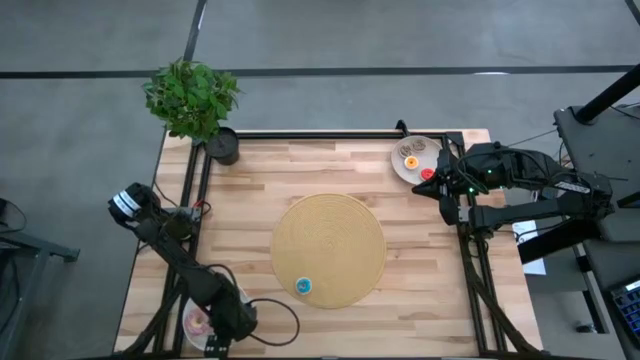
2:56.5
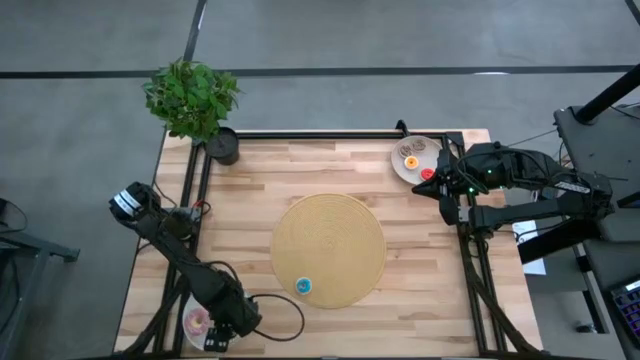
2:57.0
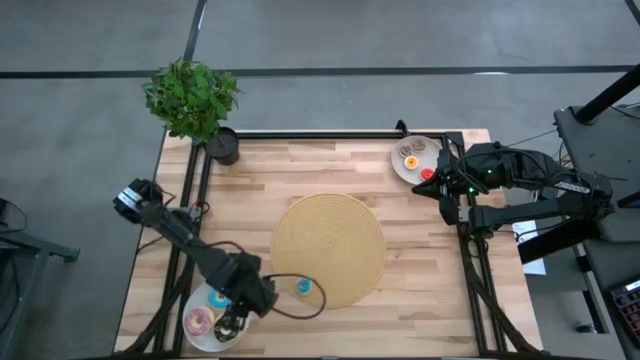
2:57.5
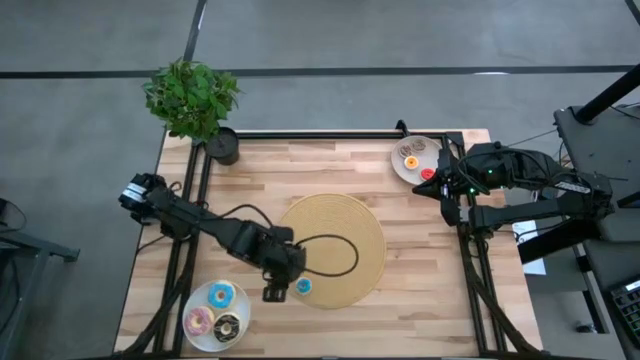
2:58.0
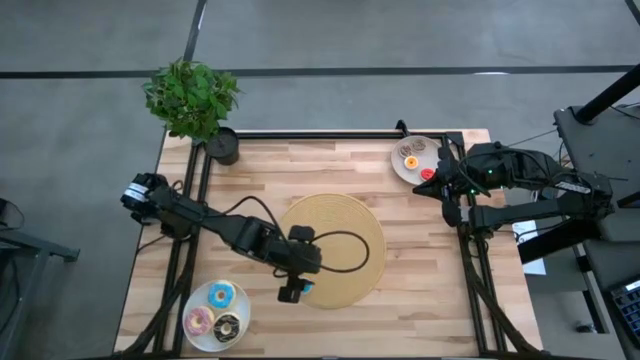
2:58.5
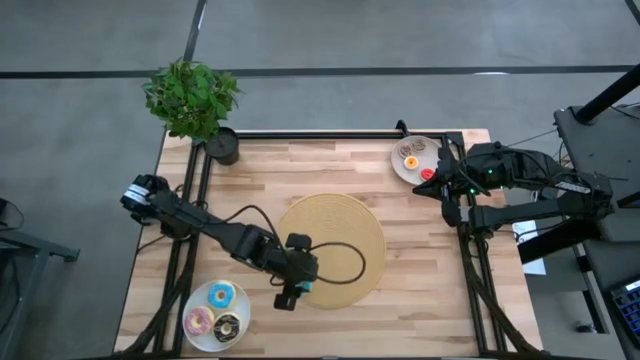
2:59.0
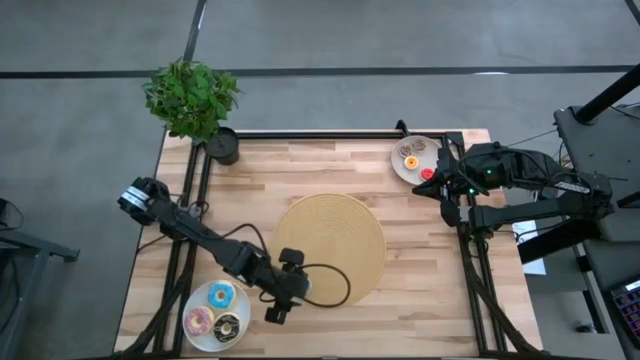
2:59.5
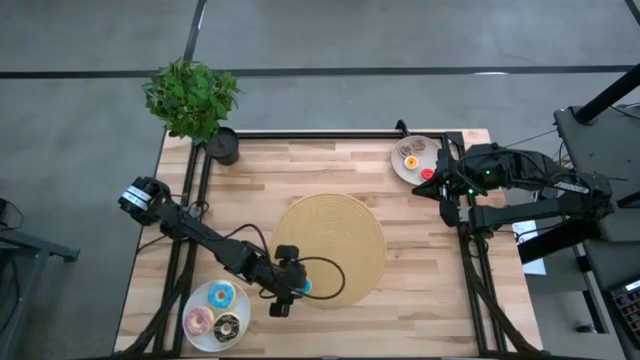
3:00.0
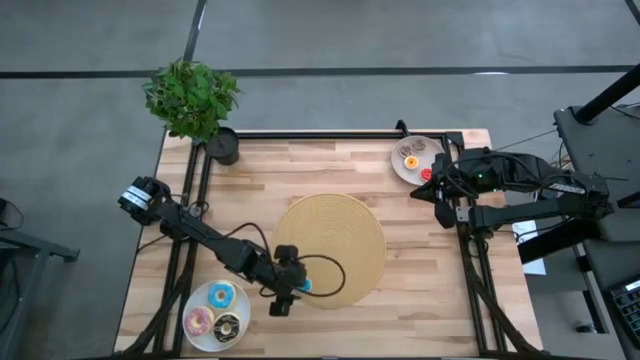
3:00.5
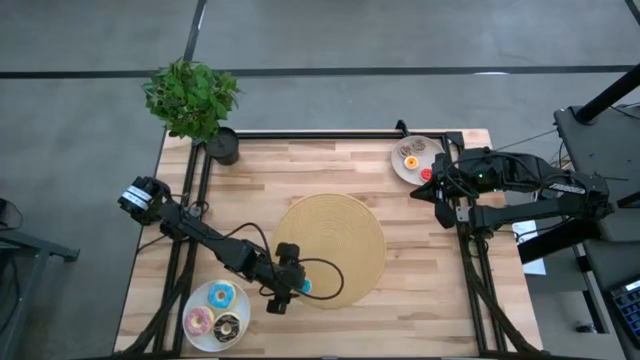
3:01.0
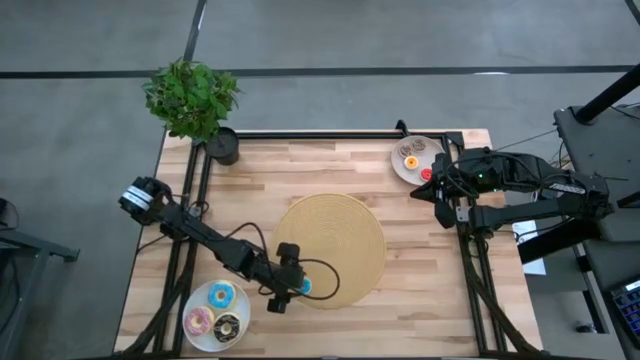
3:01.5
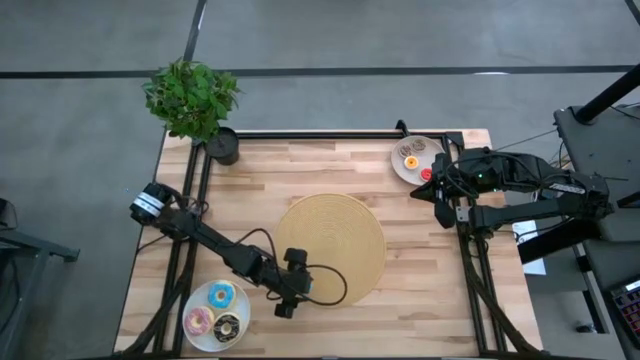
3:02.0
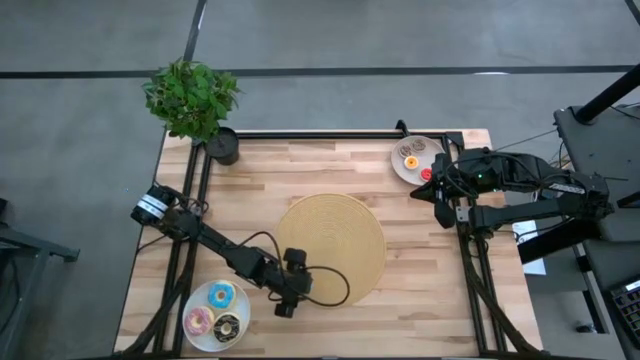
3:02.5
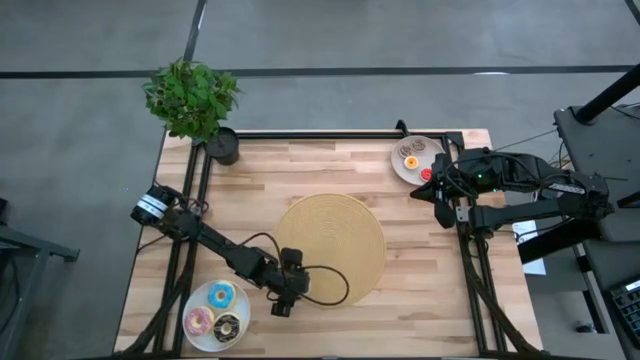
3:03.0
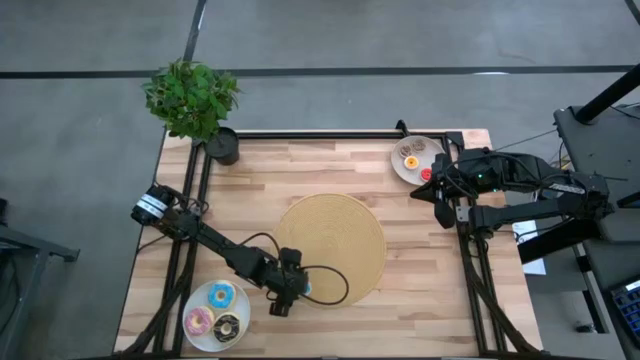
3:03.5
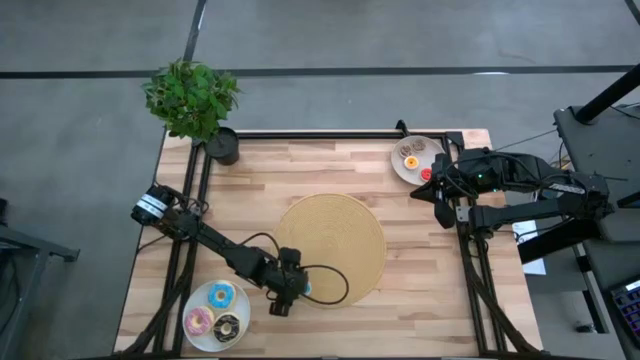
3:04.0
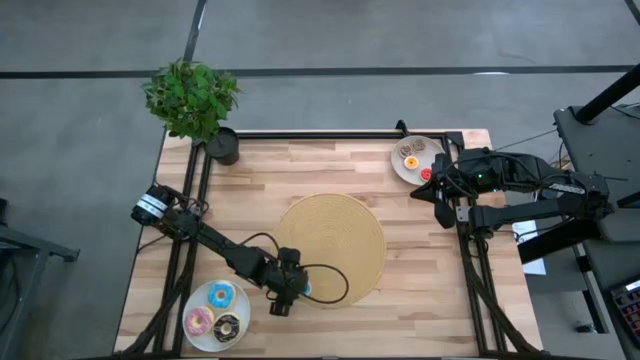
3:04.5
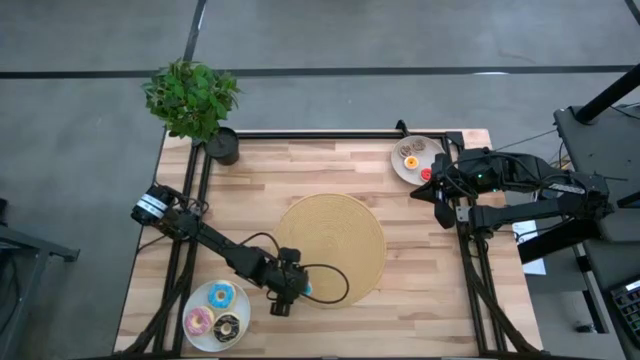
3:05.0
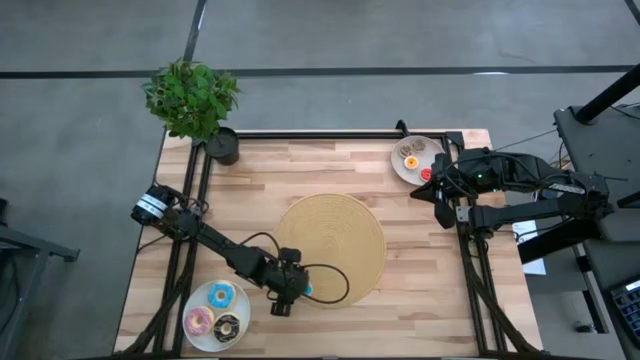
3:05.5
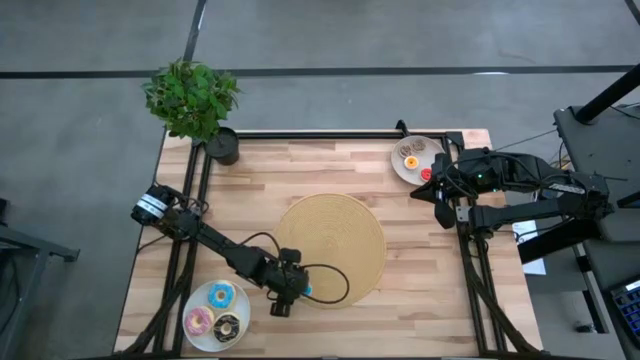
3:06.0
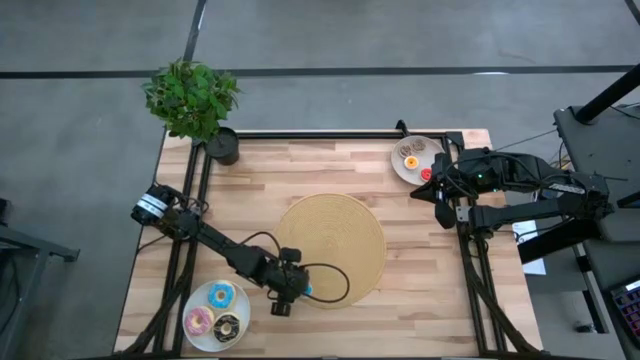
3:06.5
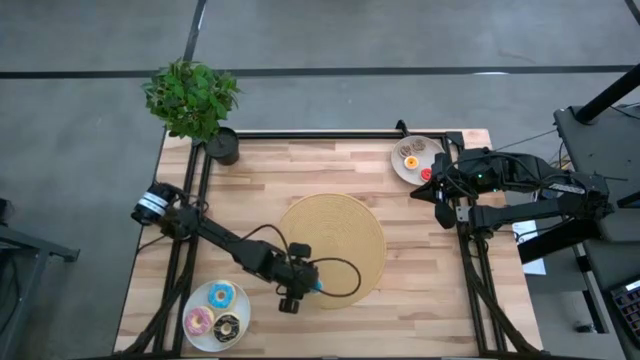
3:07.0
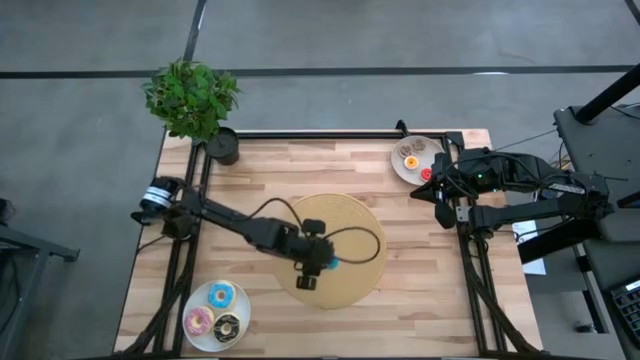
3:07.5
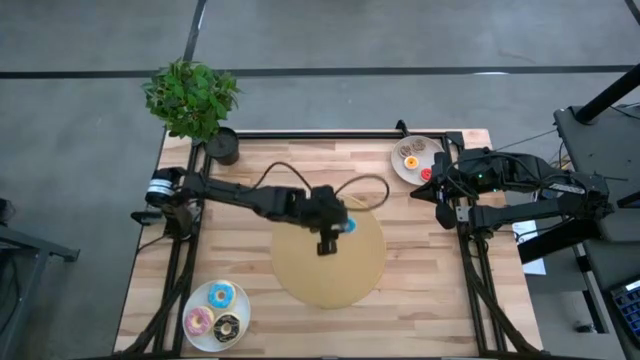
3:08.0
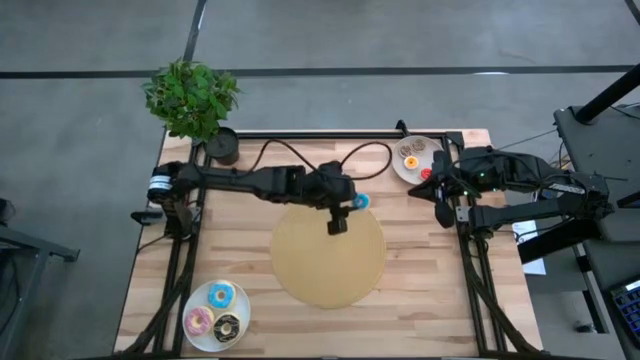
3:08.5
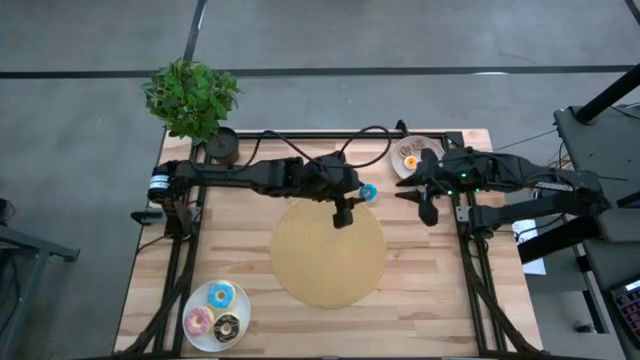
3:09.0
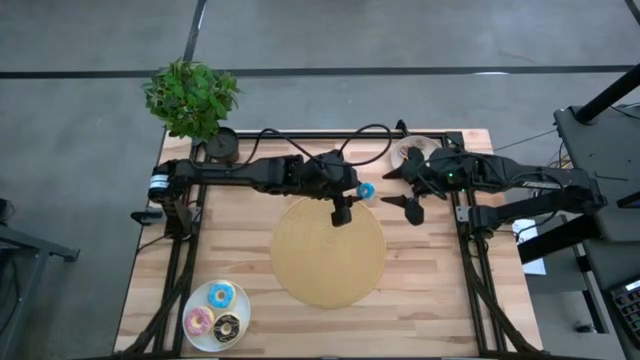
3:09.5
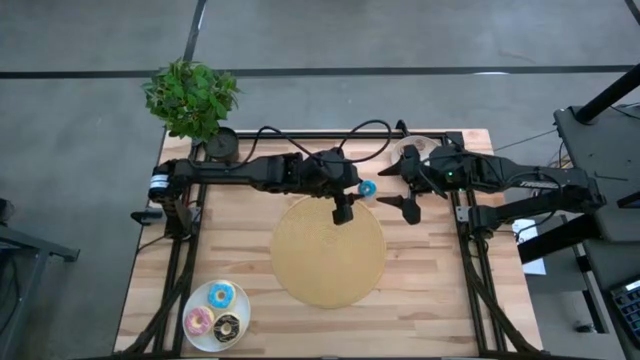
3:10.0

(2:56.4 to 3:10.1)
Task: Pick & Place donuts
Put the small blue donut on the gray plate

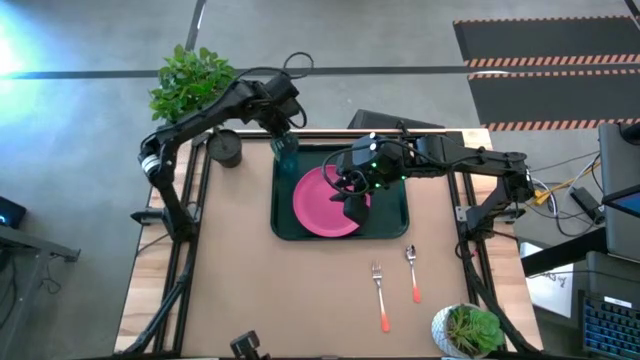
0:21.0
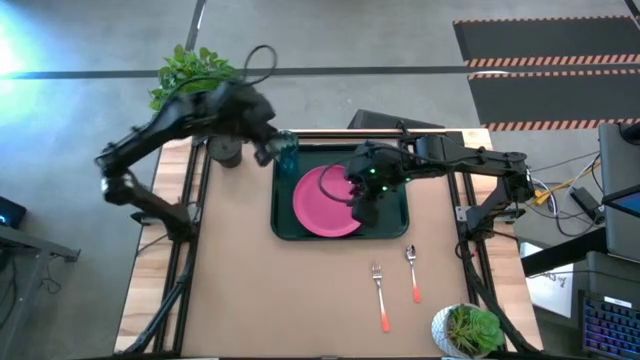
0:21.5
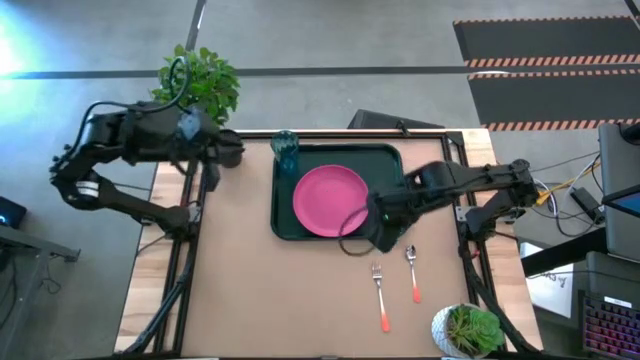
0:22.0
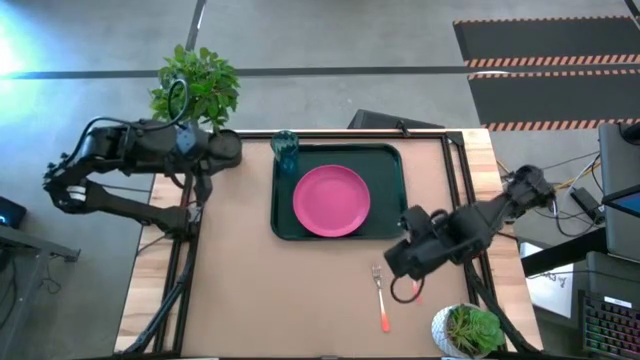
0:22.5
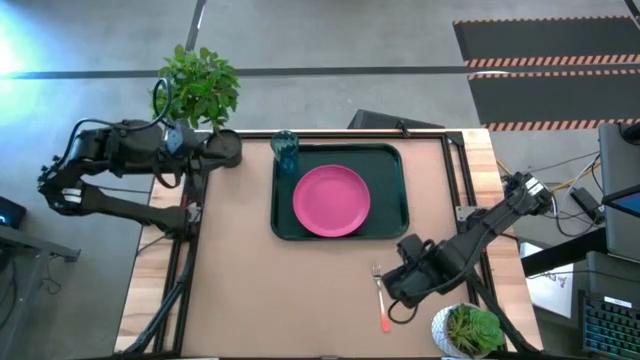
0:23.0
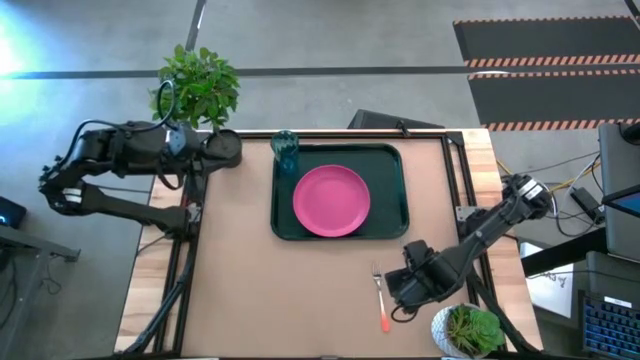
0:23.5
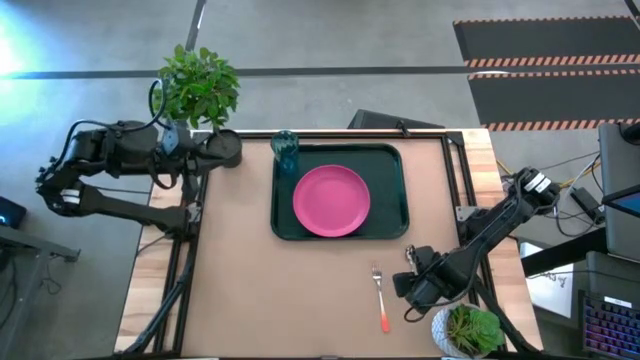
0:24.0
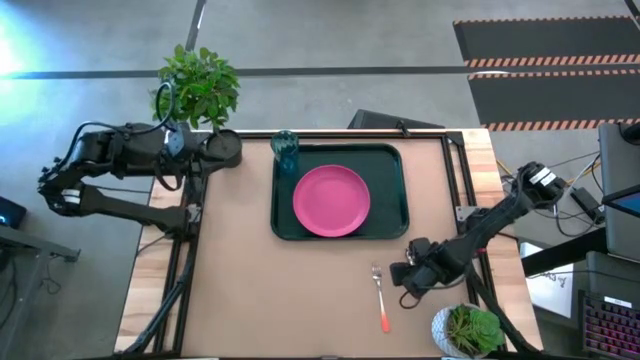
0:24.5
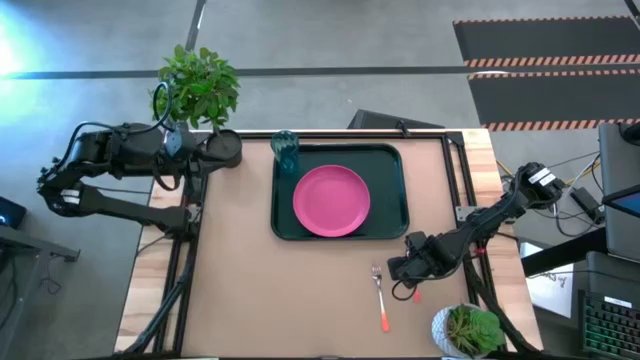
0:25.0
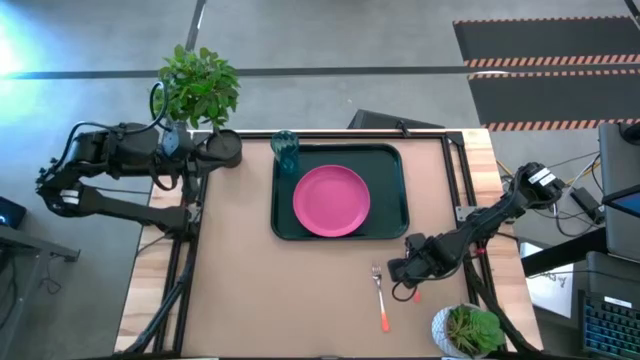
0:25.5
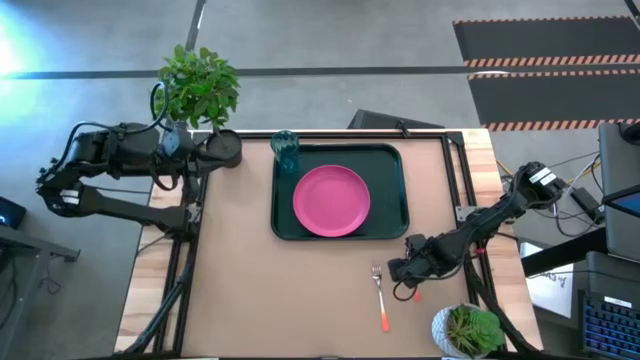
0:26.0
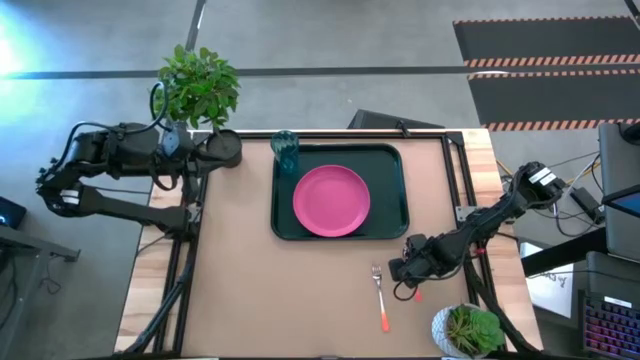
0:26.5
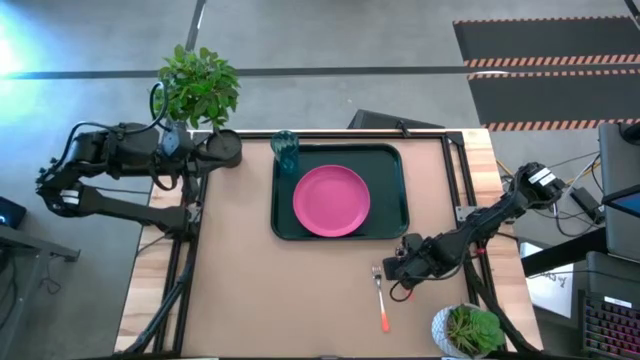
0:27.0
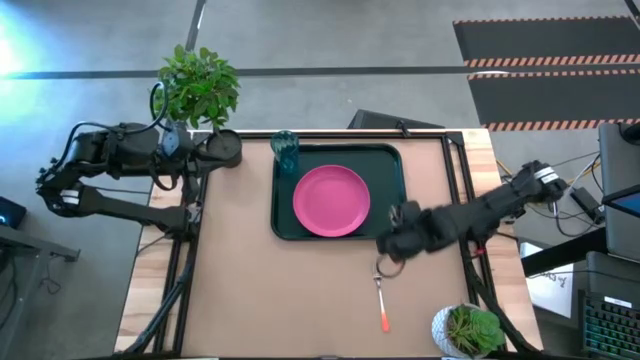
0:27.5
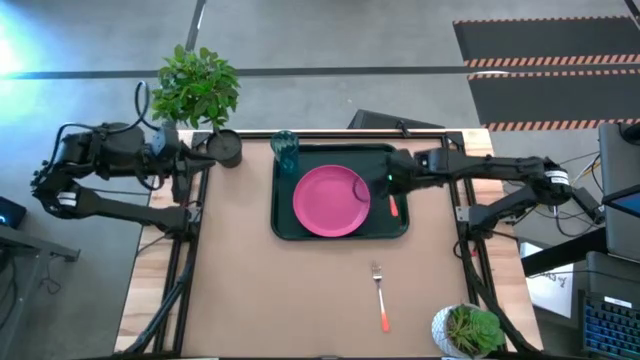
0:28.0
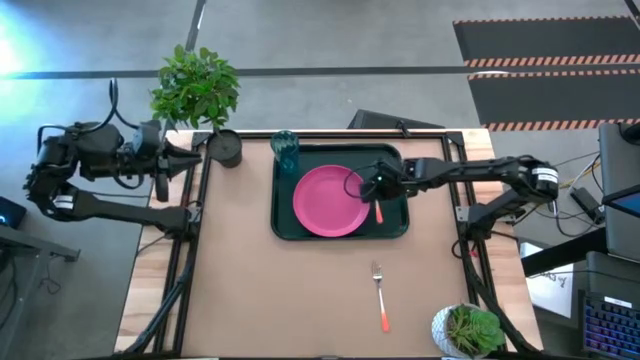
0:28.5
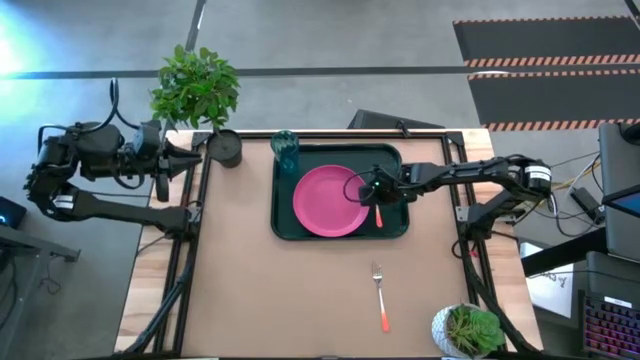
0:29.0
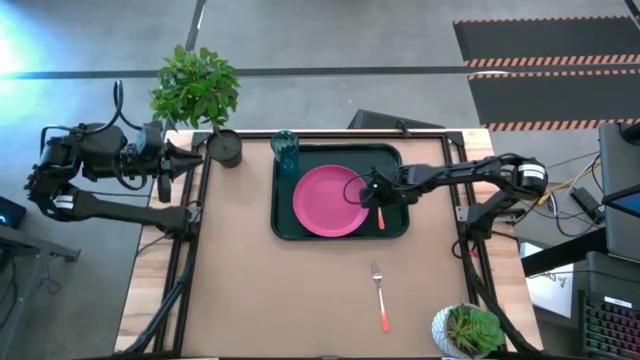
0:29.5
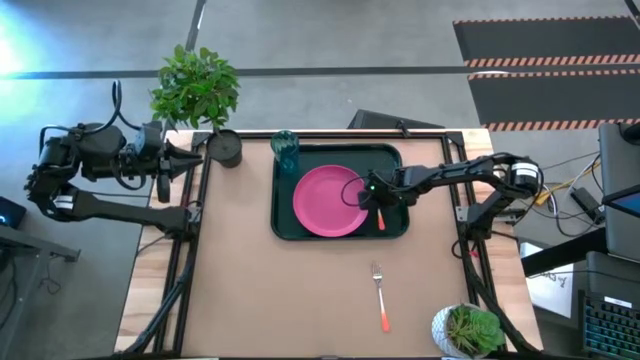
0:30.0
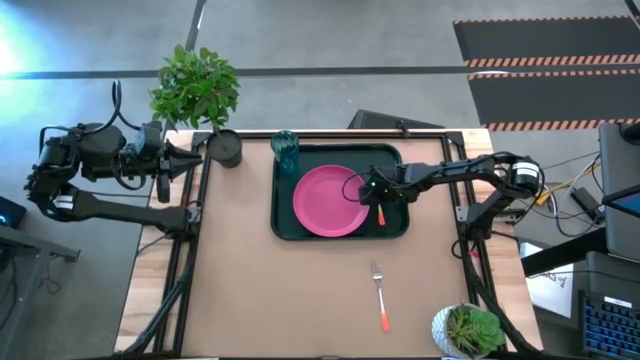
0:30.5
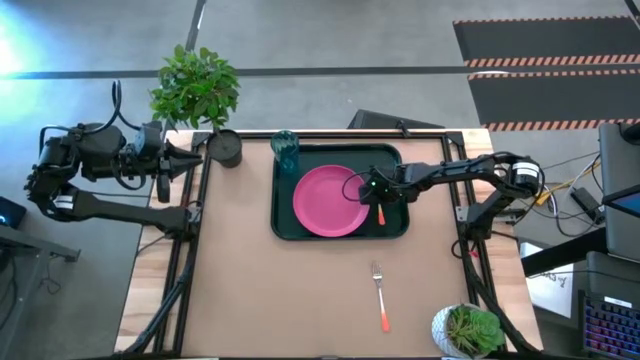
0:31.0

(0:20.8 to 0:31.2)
Task: Pick and place plate/cup/fork/spoon on tray
Put the orange spoon on the black tray to the right of the pink plate
